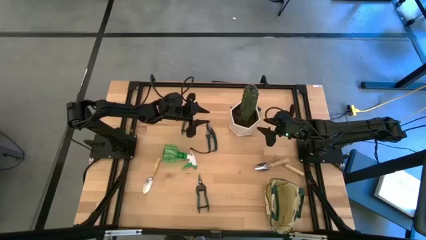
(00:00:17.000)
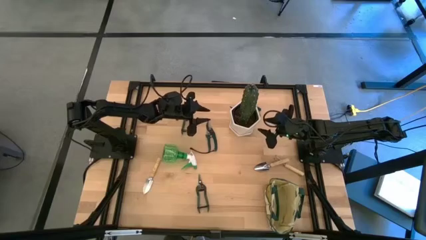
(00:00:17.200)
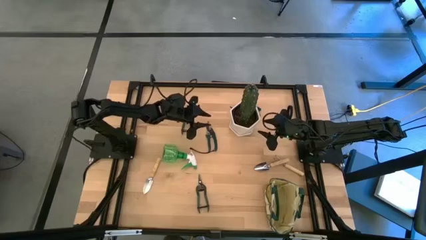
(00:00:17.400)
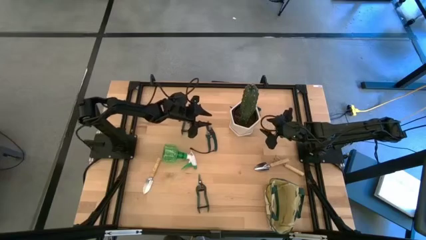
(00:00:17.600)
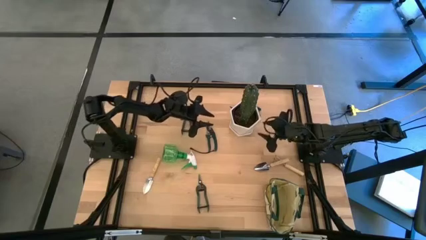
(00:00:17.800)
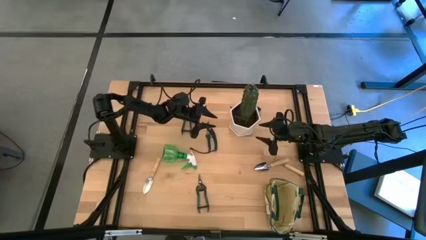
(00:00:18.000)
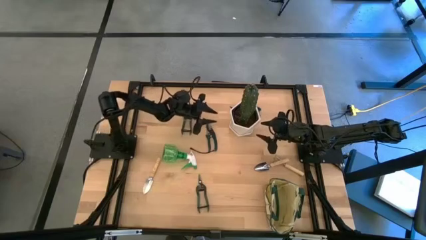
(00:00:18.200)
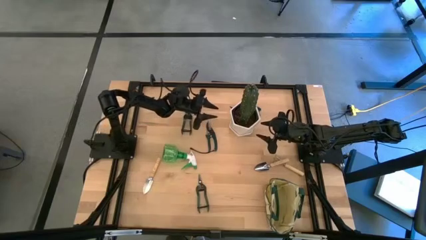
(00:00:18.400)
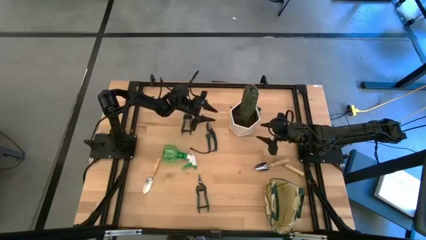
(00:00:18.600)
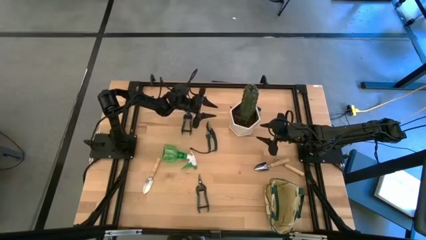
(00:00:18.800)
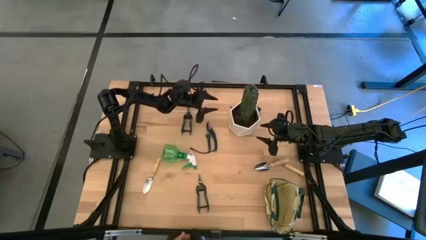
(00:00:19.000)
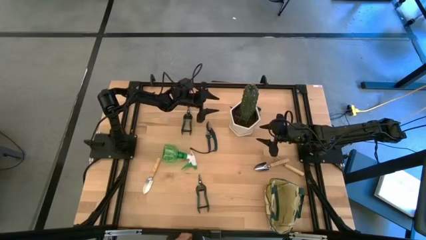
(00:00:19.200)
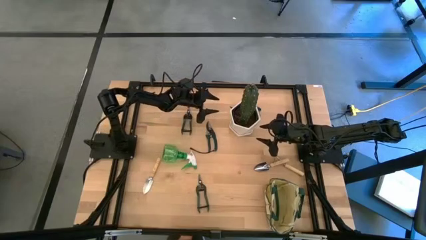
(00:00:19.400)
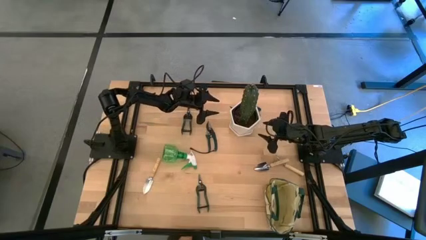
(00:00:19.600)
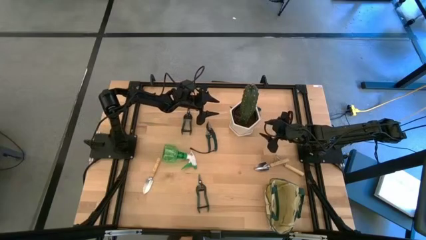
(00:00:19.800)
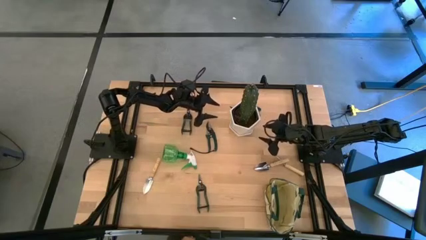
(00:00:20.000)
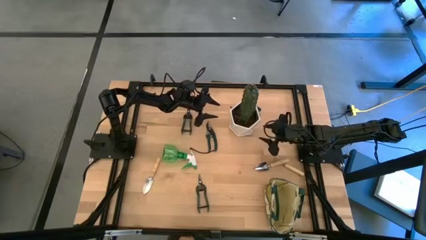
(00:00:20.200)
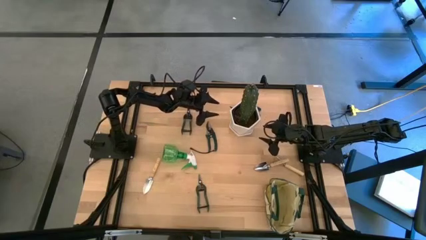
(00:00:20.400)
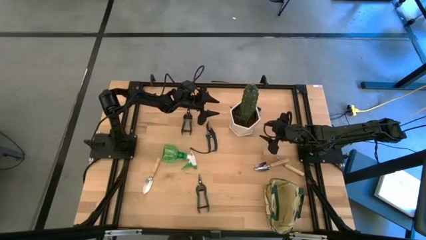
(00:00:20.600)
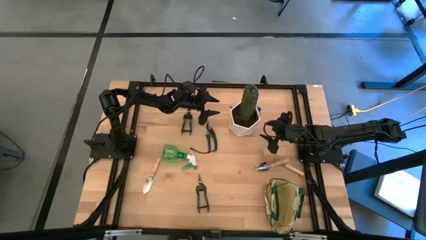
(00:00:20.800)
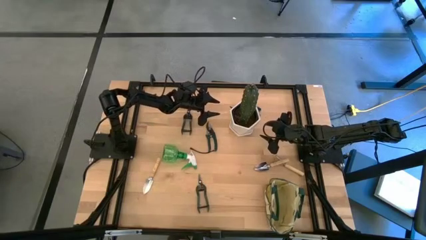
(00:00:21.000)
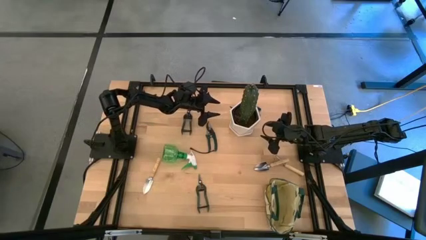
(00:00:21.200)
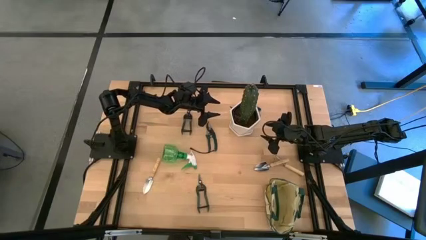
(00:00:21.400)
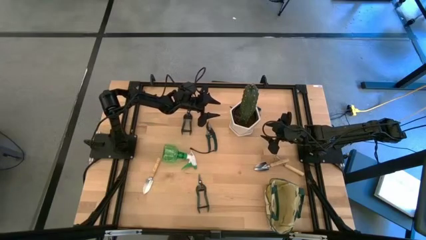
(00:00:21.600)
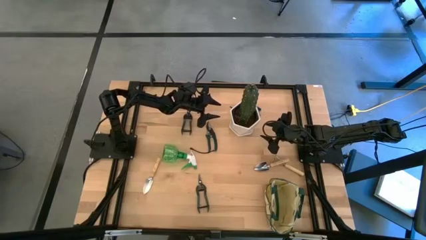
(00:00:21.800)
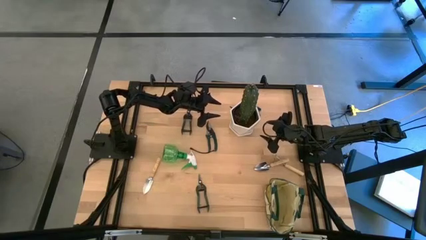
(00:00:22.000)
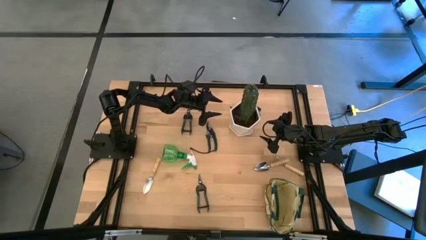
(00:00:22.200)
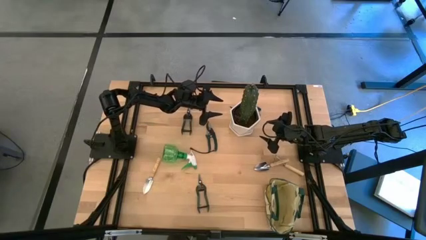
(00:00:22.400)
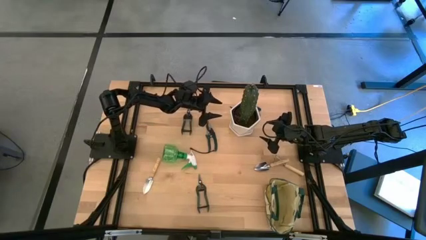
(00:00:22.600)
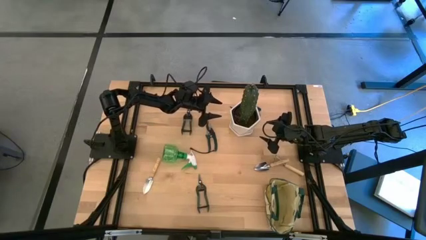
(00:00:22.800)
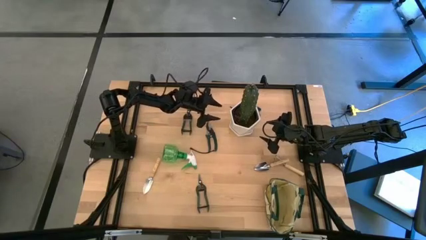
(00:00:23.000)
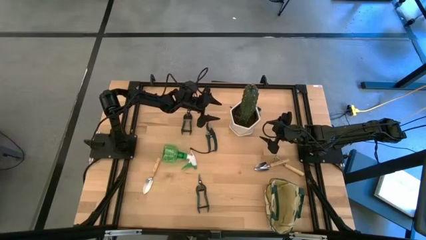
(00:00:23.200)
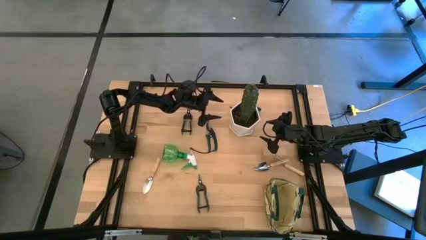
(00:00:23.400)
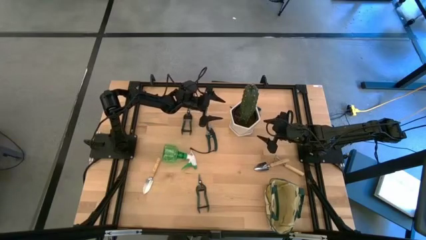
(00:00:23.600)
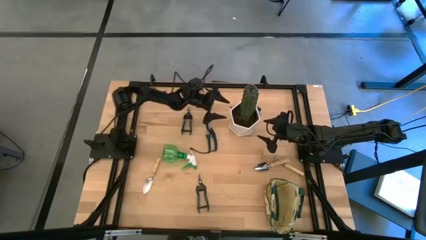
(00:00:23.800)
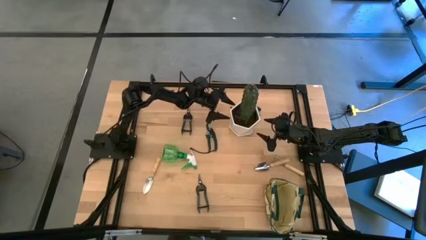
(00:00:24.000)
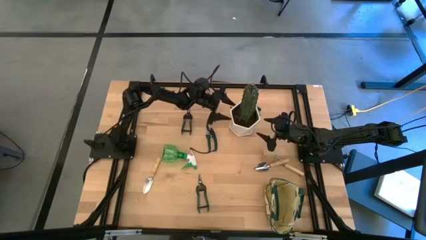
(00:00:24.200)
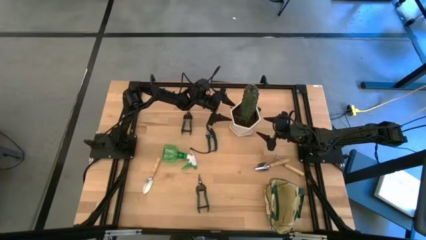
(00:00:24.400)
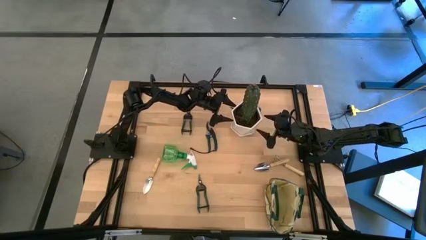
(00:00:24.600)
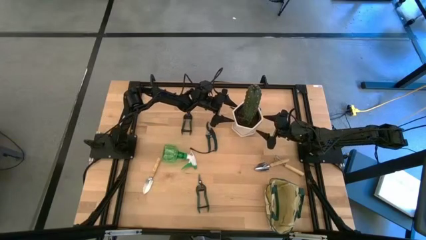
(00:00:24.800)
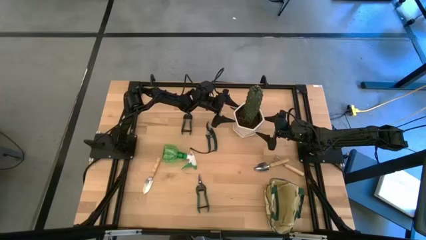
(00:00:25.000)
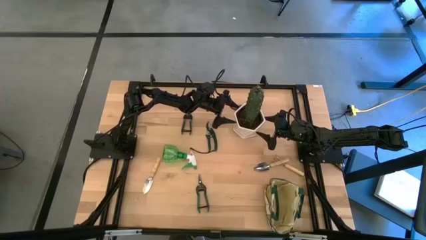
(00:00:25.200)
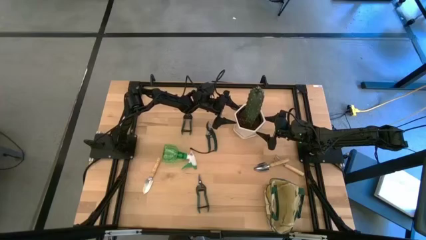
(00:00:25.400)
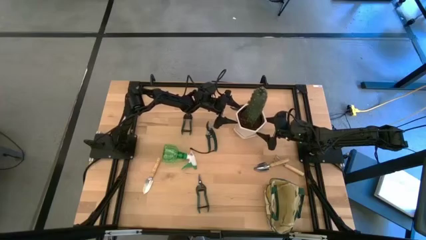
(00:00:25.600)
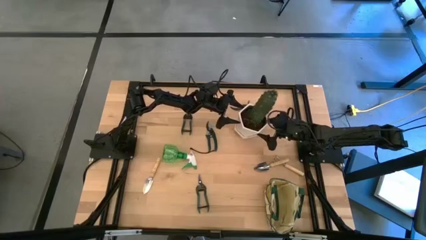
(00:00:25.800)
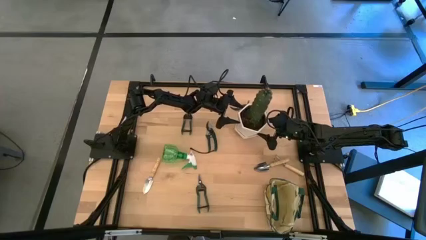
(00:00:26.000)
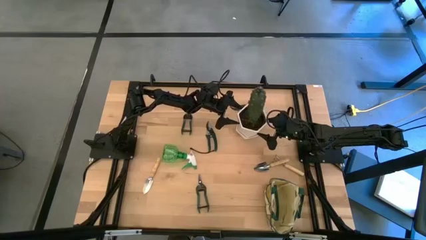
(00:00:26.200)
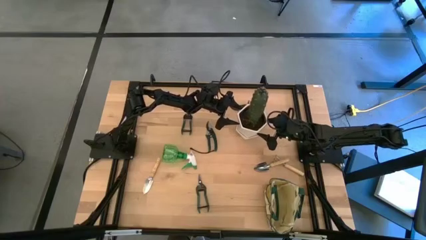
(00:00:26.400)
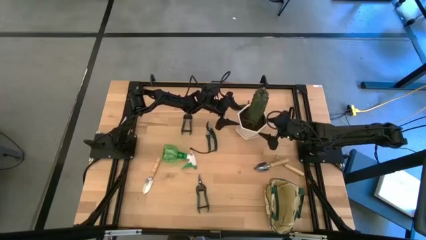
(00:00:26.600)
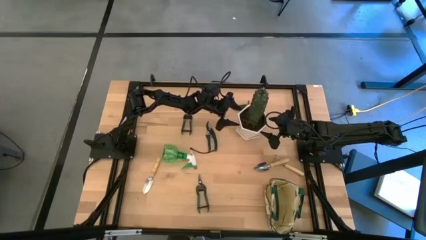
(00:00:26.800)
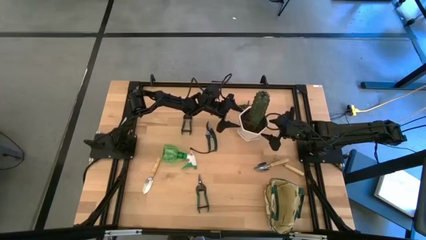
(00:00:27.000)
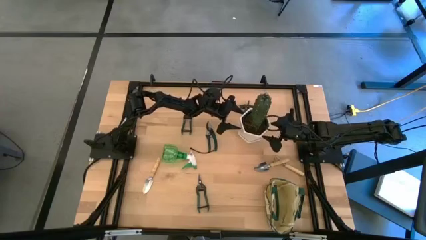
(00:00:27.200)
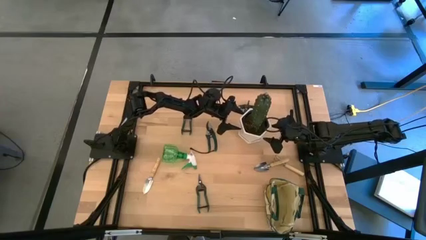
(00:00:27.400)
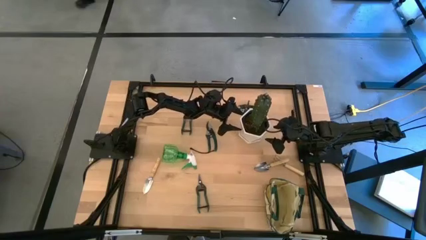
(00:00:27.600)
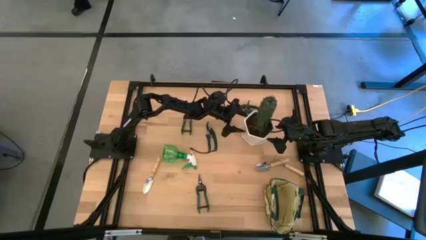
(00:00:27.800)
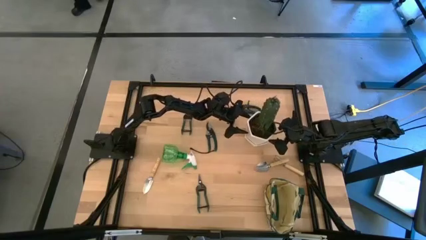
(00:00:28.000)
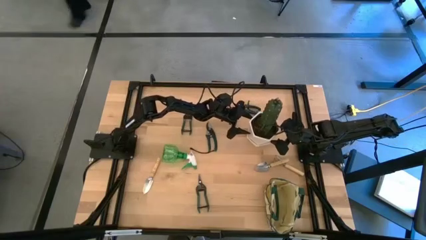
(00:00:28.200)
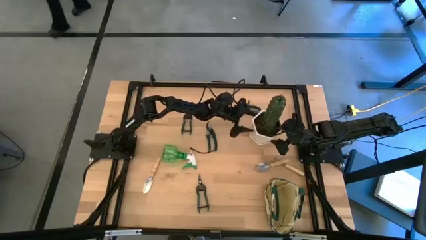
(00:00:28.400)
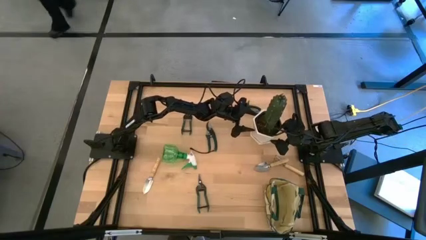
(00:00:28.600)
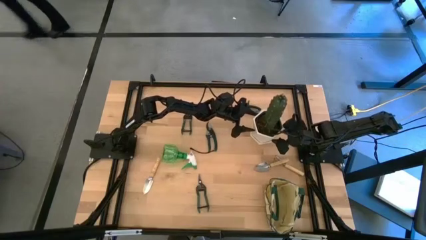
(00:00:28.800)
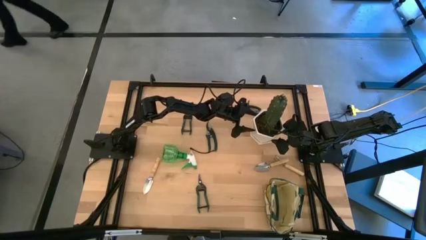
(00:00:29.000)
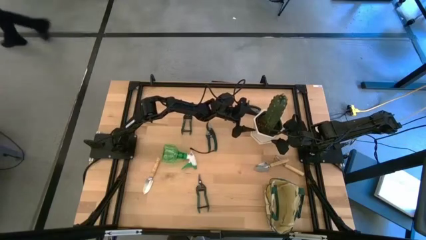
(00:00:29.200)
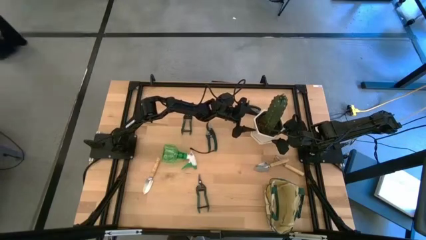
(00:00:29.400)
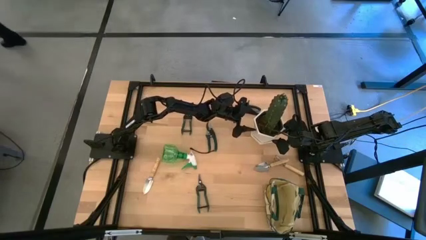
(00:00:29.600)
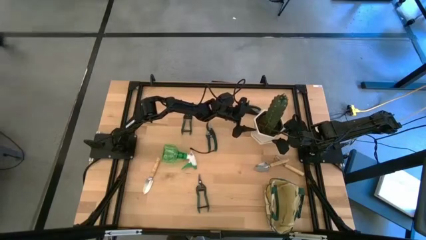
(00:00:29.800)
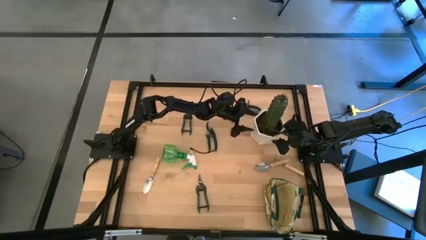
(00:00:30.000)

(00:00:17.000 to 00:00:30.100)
Task: Pick & Place Garden tools in Gardening bag
Move the white vase to the right side of the table

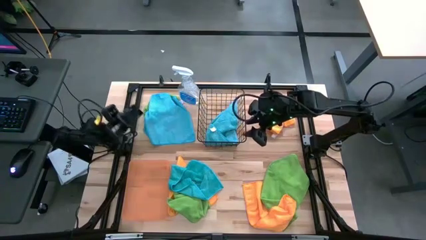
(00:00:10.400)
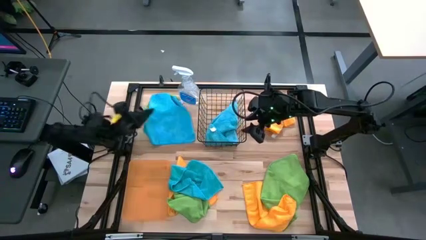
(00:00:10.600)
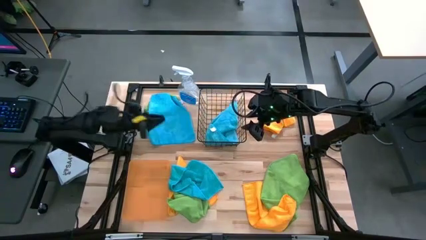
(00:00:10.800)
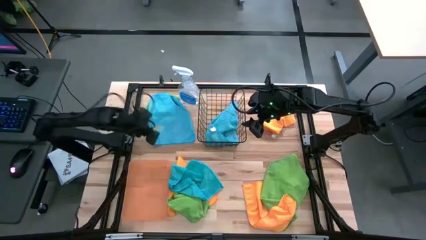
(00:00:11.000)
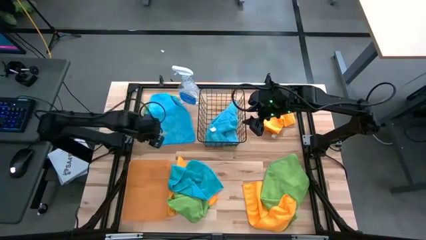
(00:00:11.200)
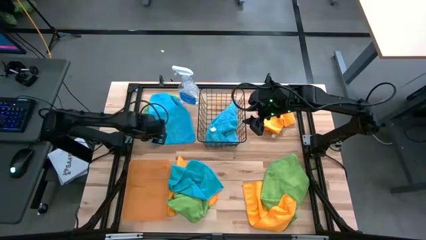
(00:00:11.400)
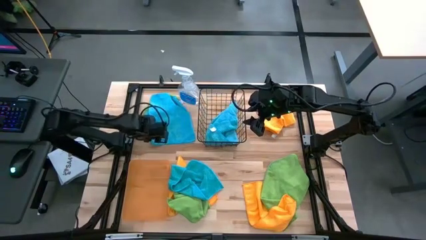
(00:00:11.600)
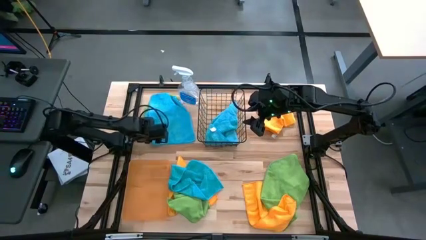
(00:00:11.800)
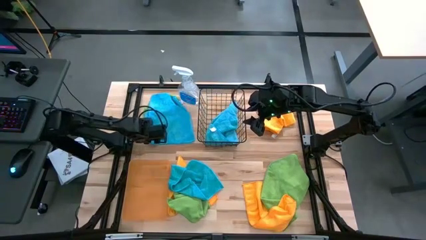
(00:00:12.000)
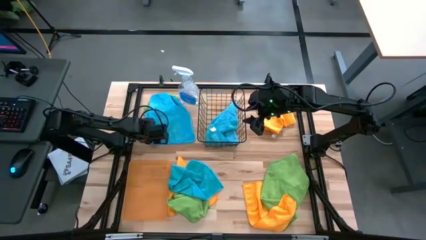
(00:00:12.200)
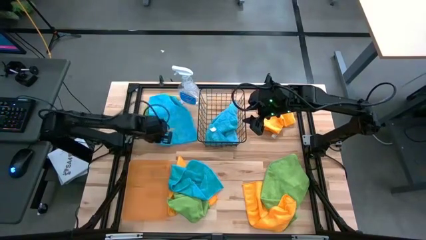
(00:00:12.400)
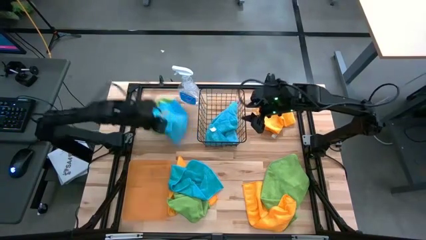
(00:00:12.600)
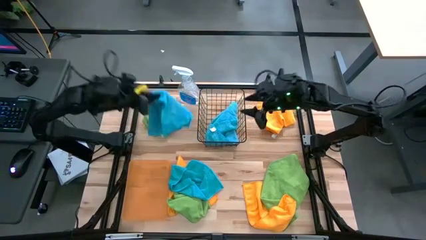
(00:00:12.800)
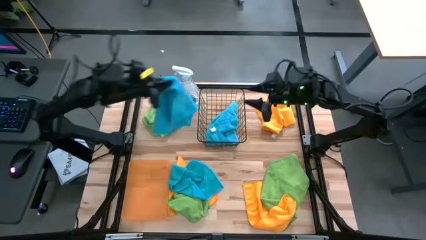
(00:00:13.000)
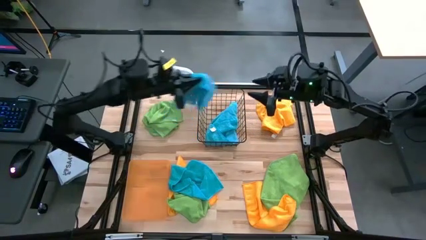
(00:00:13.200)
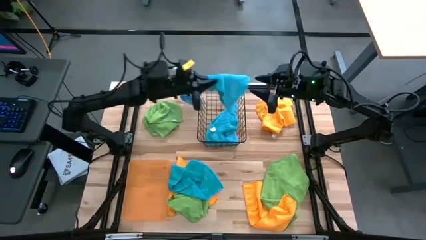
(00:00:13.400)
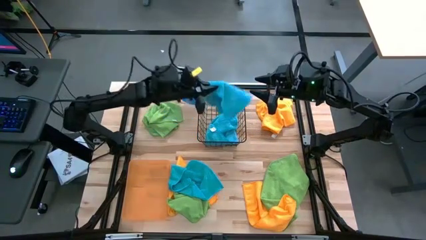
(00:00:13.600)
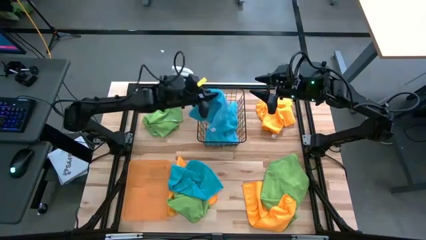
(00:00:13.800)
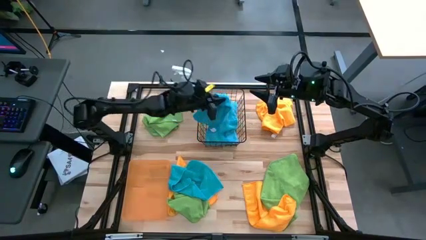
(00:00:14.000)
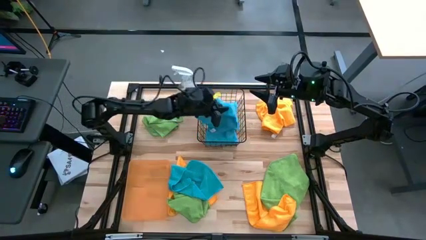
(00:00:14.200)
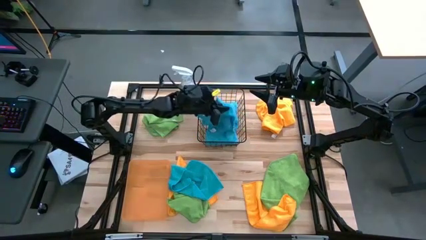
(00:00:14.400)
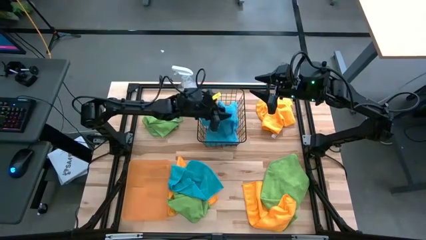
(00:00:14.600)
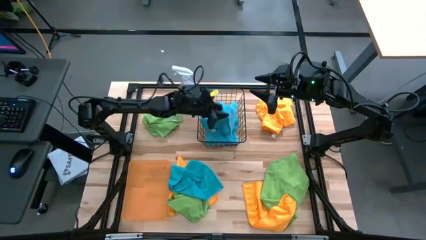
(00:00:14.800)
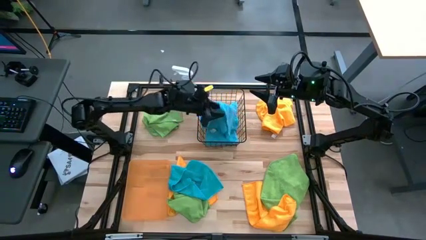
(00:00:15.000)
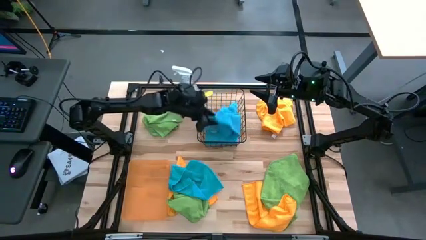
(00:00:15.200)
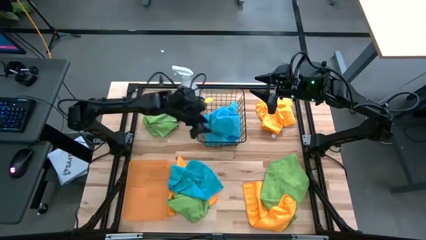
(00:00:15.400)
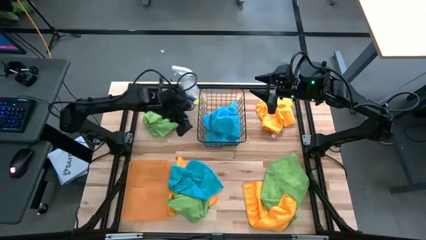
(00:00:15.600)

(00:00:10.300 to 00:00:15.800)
Task: Sort microfiber towel by color & place in baskets
Put the top blue towel into the black basket
